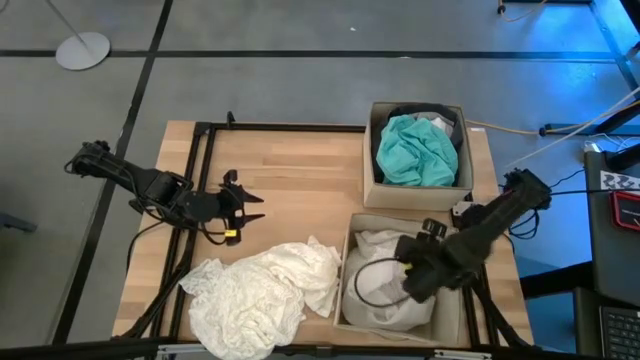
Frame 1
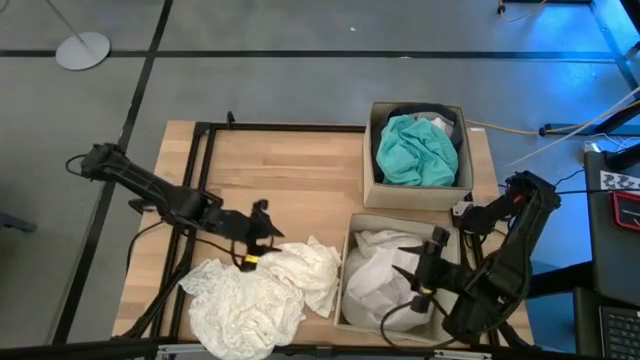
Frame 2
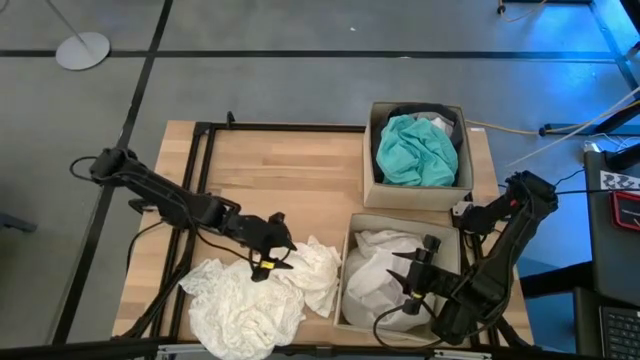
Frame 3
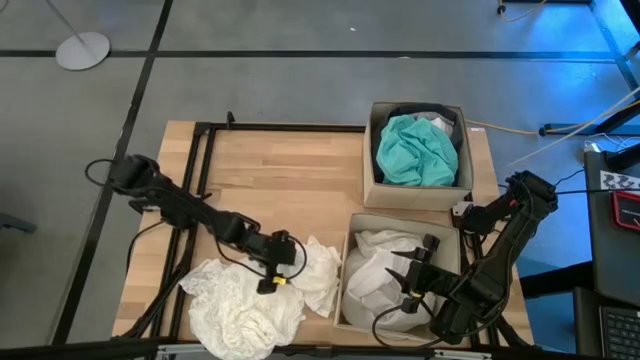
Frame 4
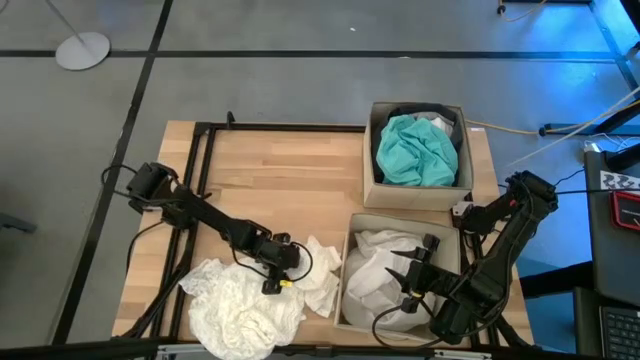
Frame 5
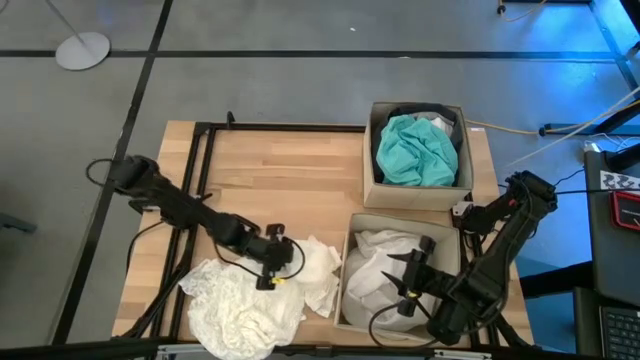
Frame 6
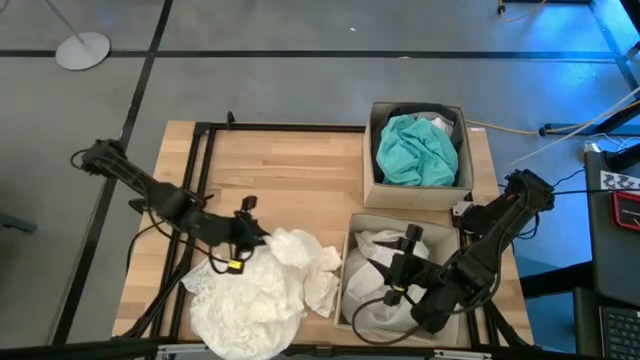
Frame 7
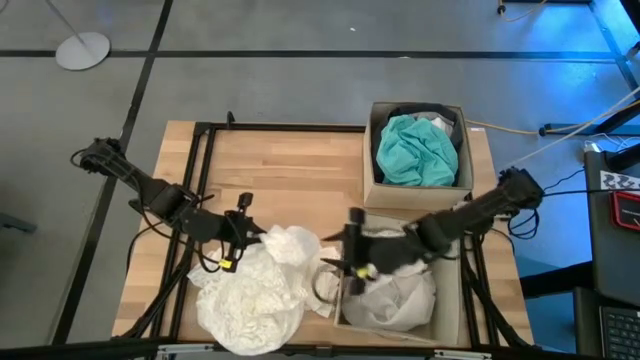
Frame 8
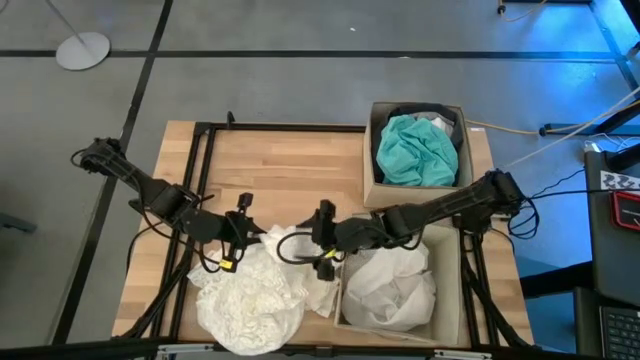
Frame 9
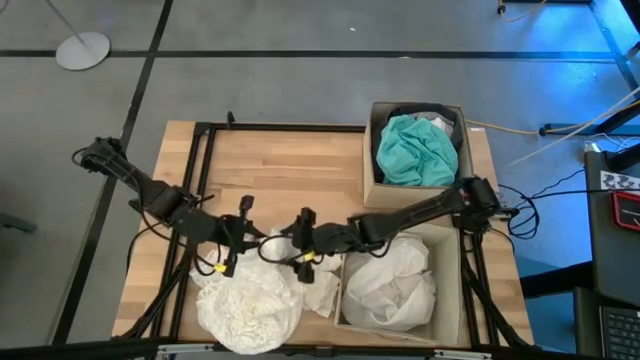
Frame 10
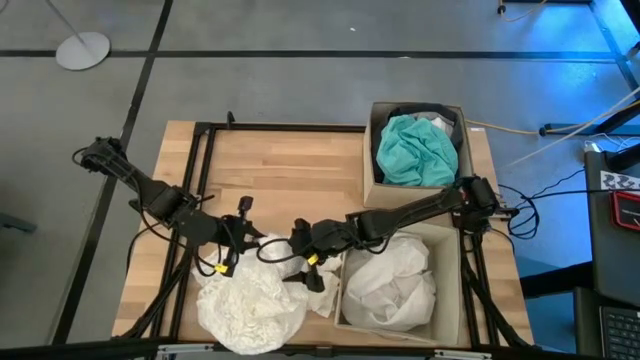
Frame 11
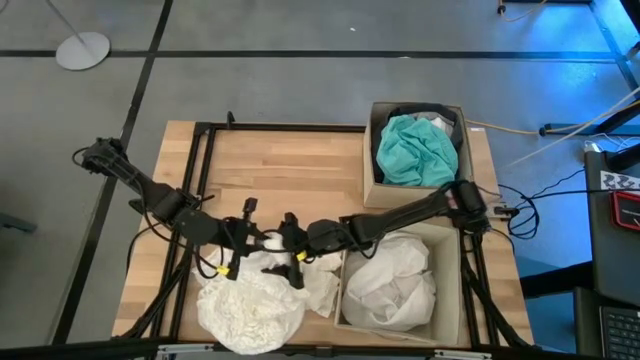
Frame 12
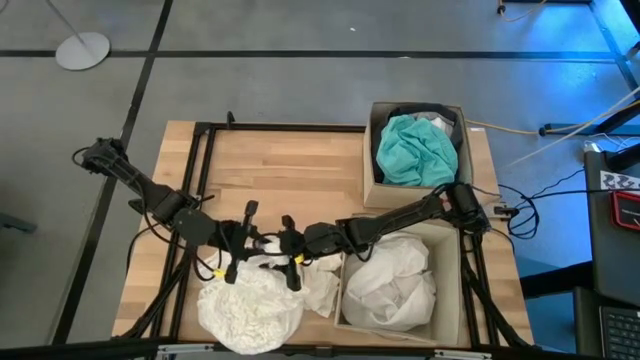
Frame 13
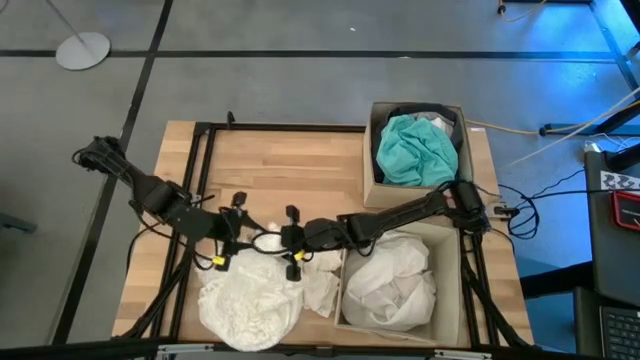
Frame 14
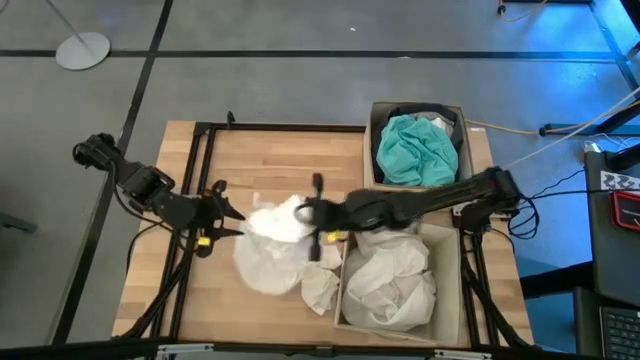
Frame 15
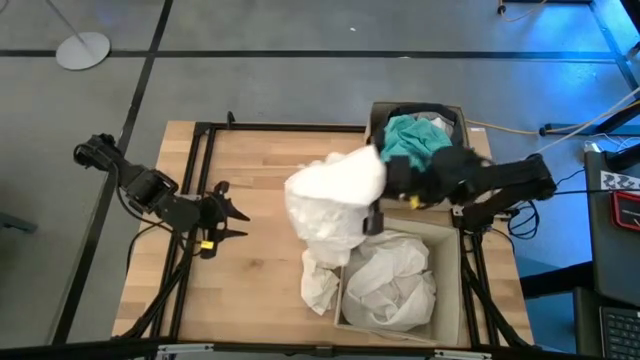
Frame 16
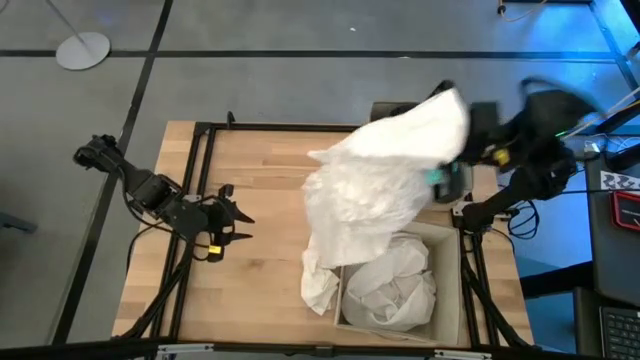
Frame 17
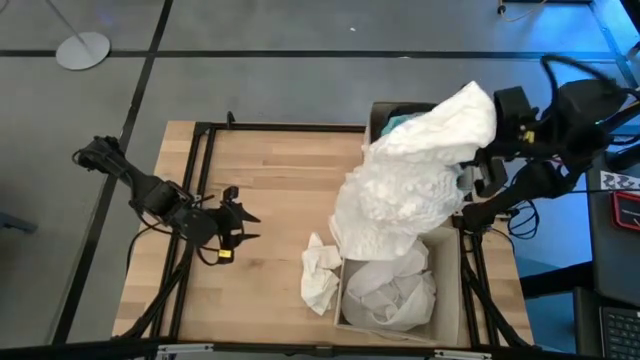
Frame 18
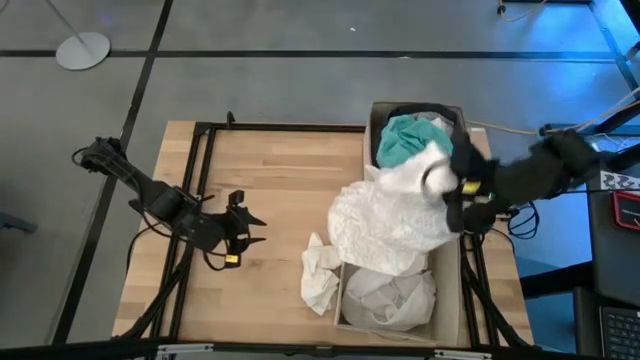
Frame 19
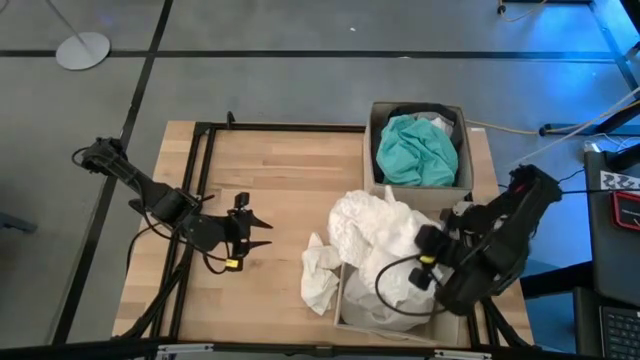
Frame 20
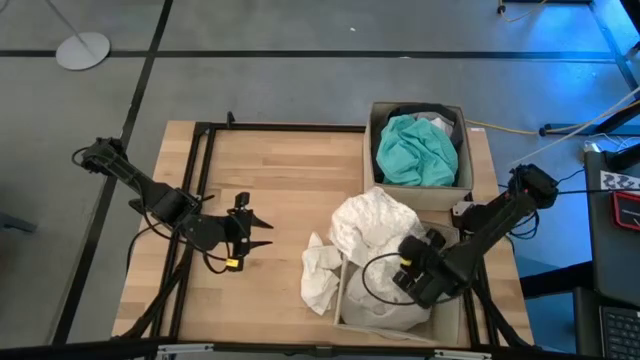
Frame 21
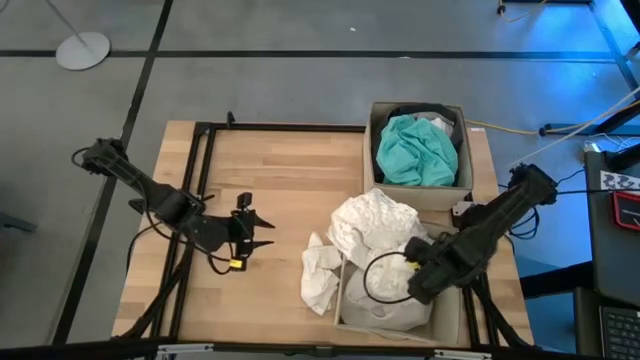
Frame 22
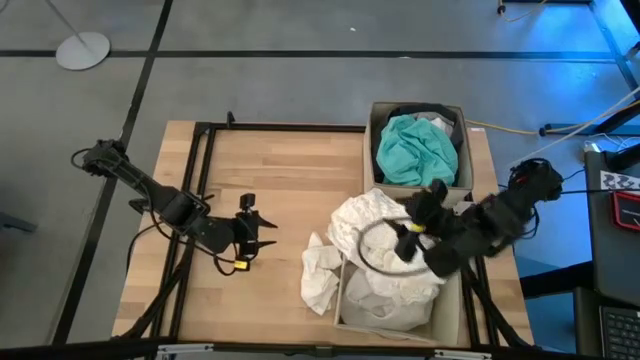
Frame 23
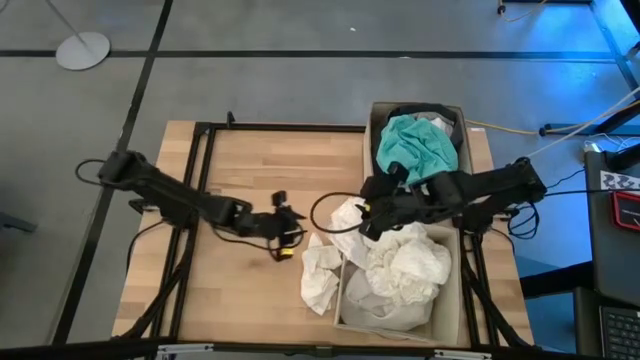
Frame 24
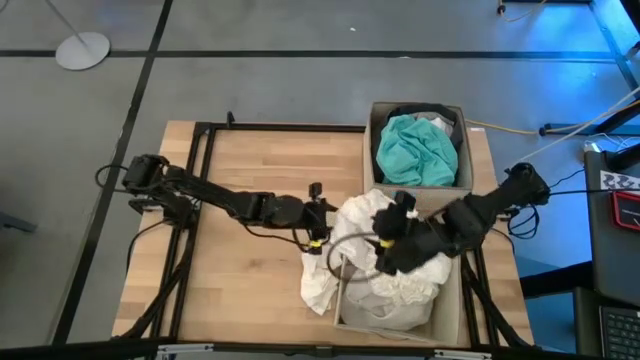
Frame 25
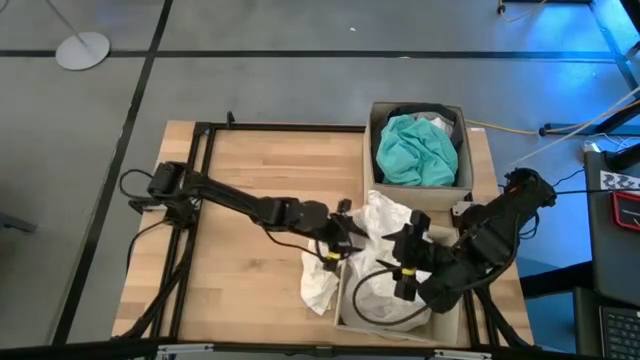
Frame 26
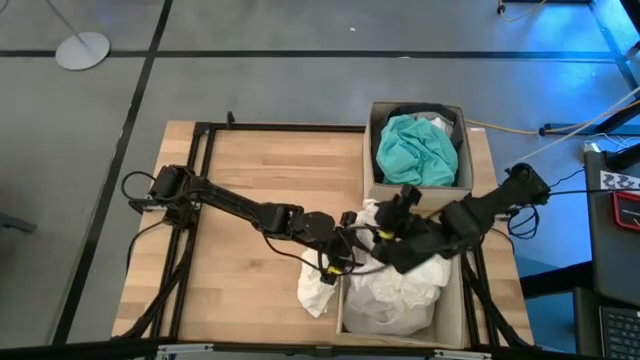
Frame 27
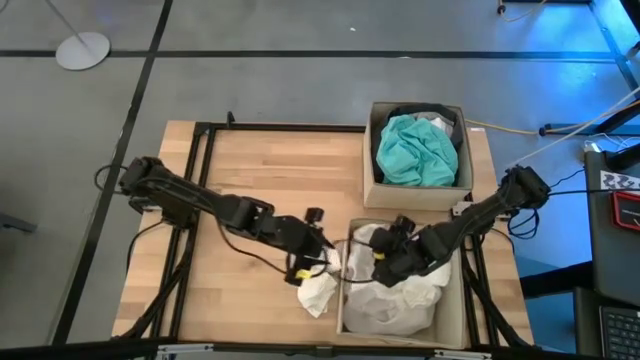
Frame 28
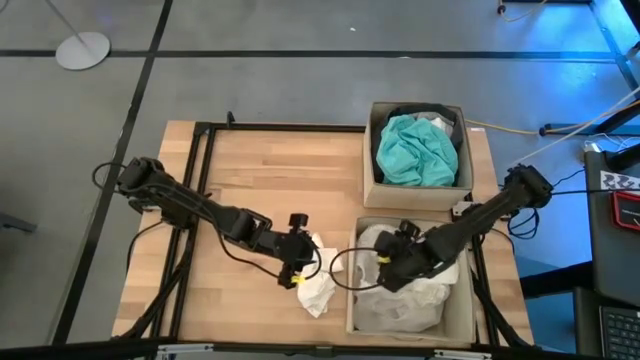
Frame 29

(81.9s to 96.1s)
Task: Sort clothes
Put the white dress into the bottom laundry organizer

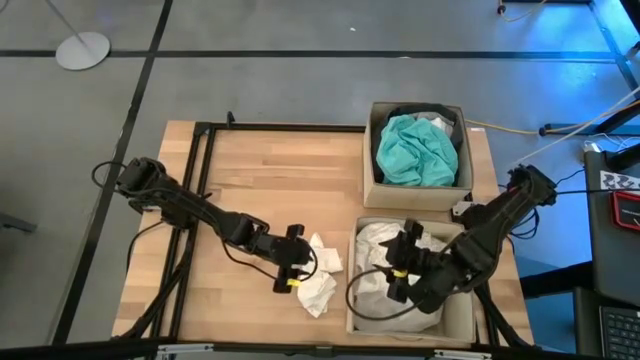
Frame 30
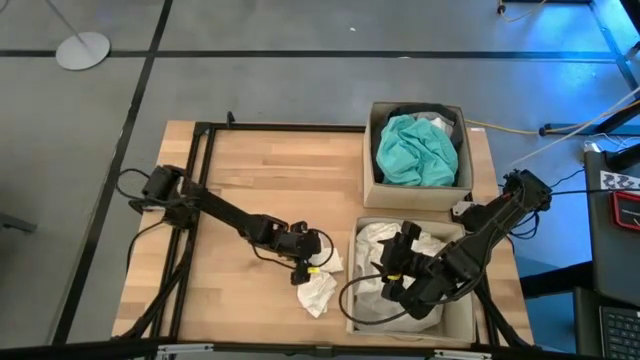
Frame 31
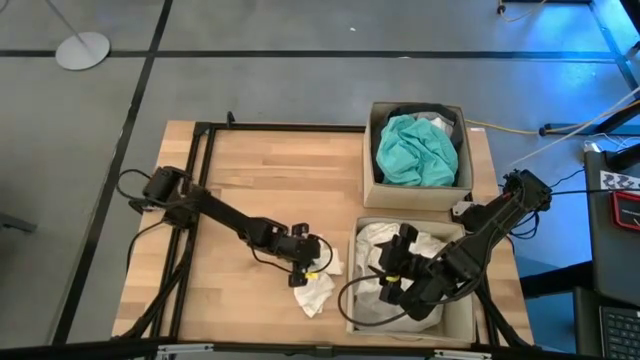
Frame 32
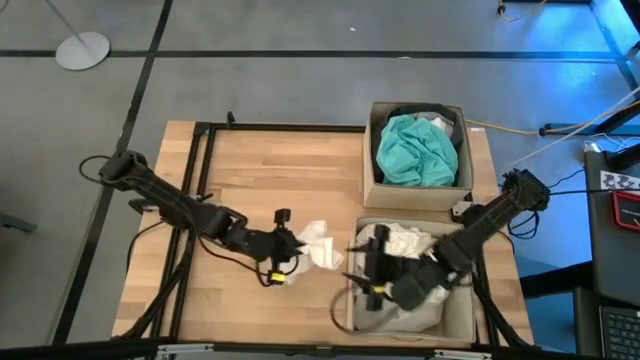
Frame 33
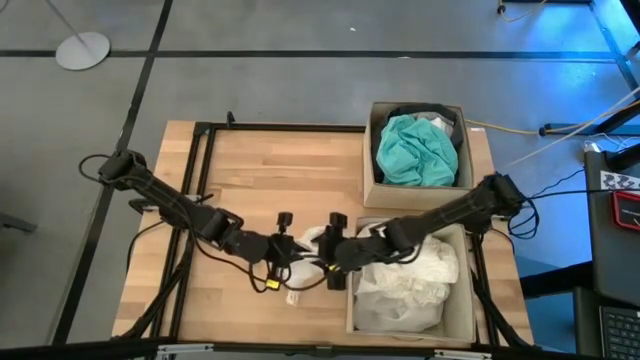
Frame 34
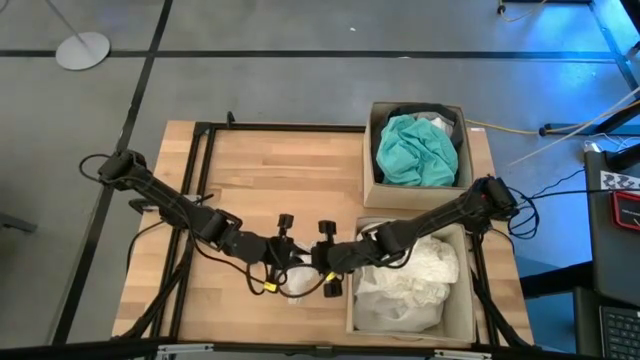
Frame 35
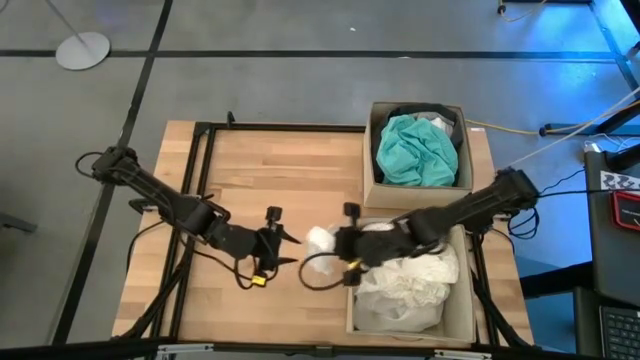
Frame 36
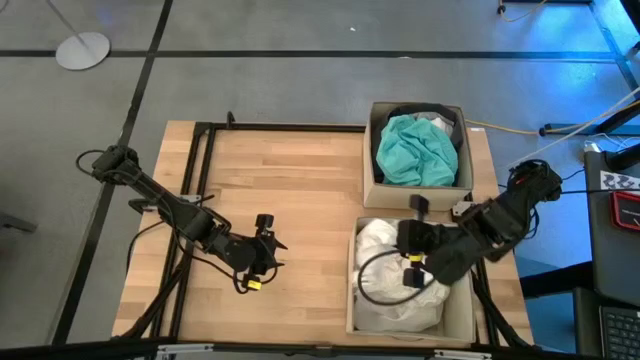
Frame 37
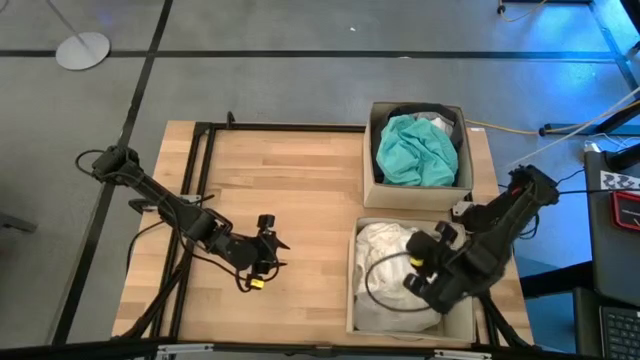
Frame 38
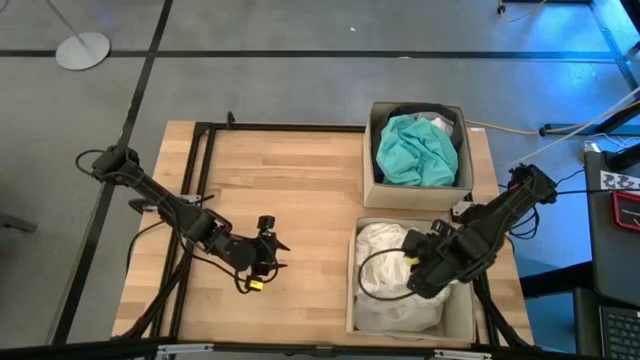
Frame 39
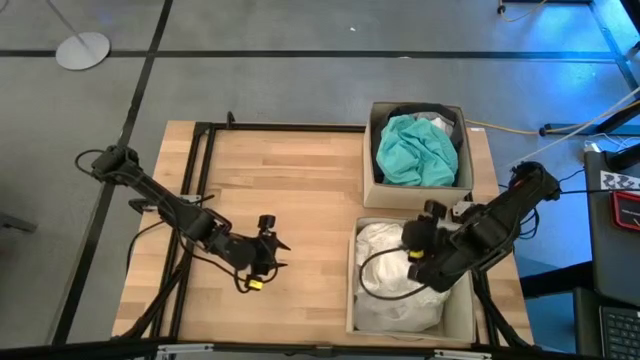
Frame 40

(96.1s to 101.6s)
Put the white underwear into the bottom laundry organizer
